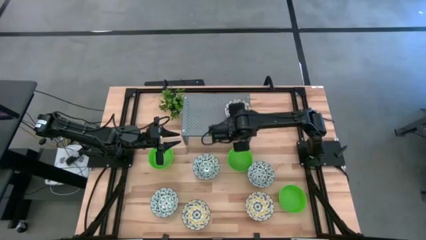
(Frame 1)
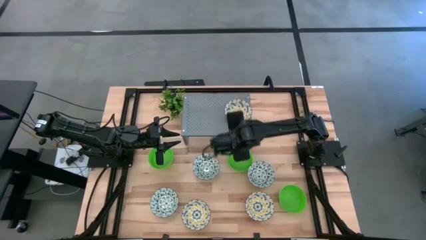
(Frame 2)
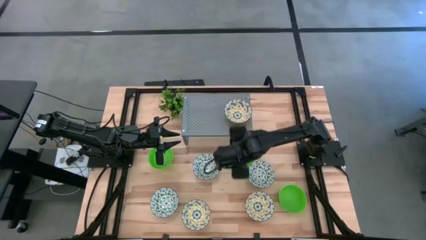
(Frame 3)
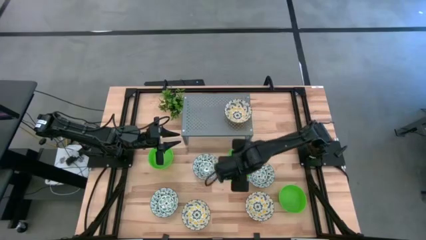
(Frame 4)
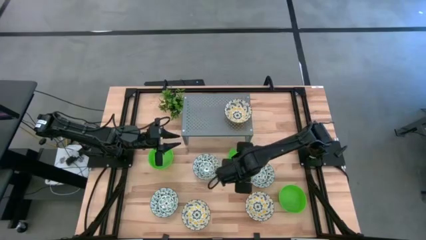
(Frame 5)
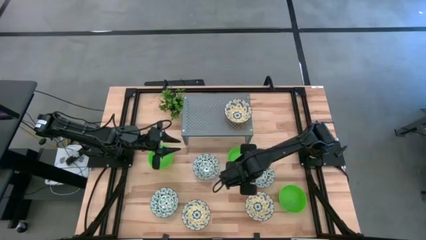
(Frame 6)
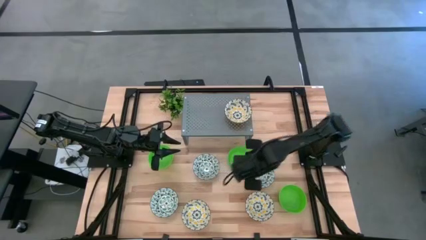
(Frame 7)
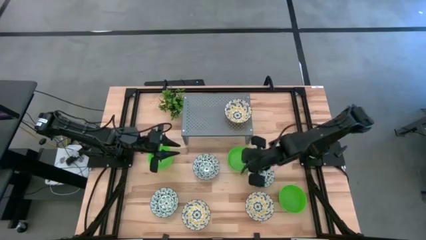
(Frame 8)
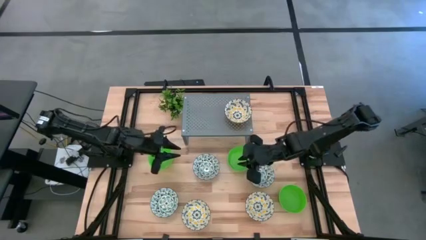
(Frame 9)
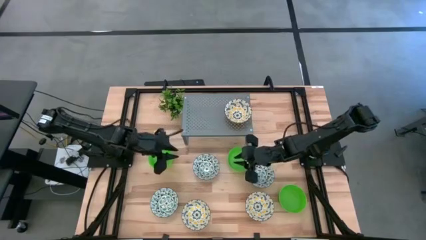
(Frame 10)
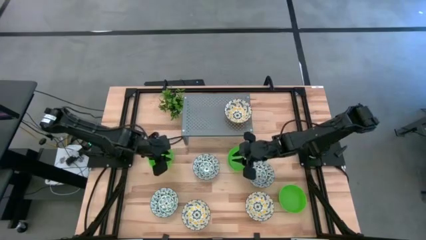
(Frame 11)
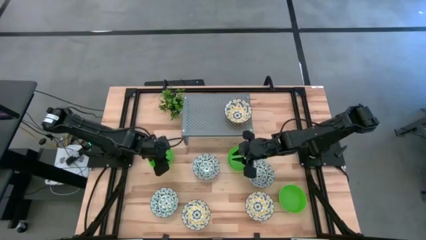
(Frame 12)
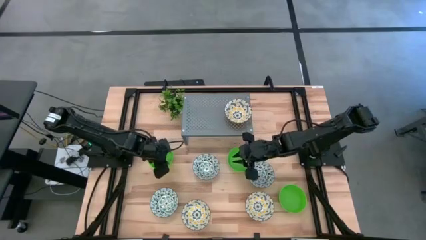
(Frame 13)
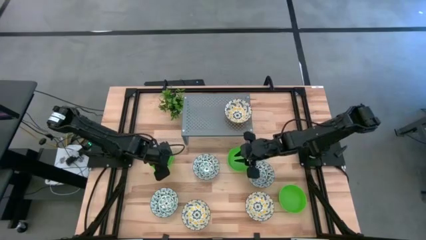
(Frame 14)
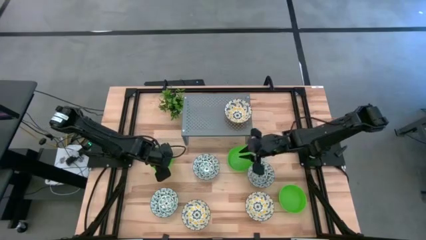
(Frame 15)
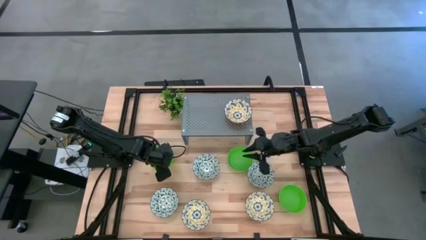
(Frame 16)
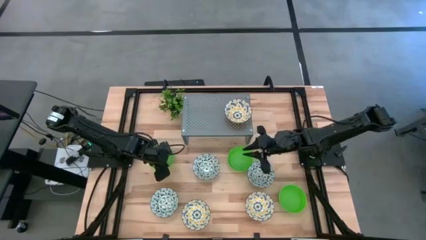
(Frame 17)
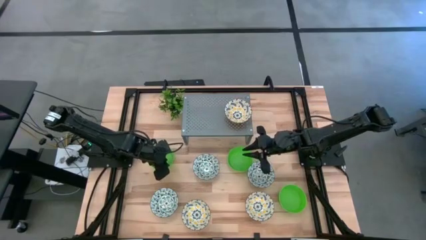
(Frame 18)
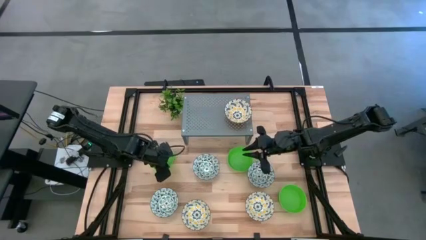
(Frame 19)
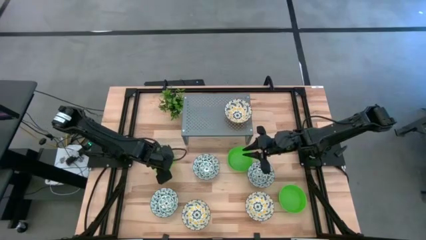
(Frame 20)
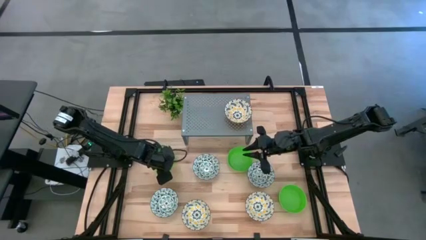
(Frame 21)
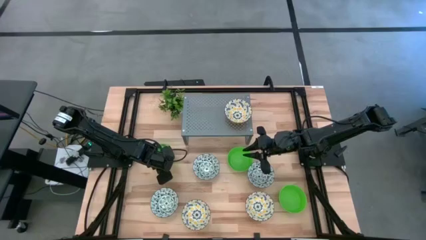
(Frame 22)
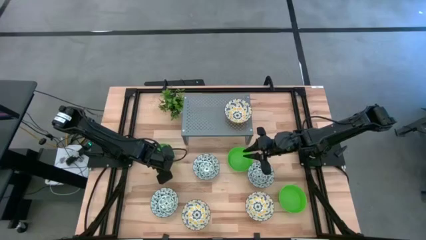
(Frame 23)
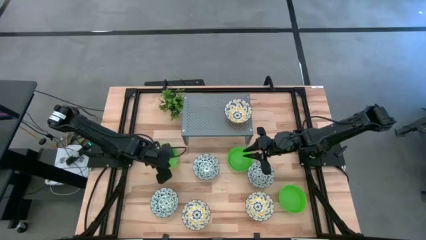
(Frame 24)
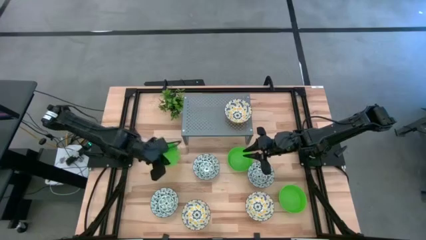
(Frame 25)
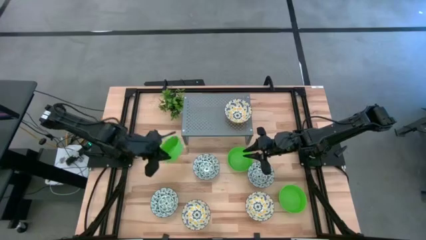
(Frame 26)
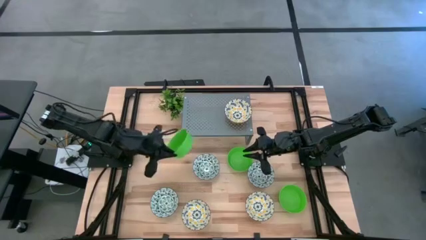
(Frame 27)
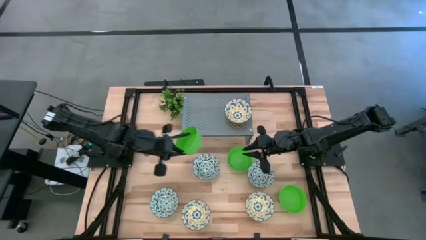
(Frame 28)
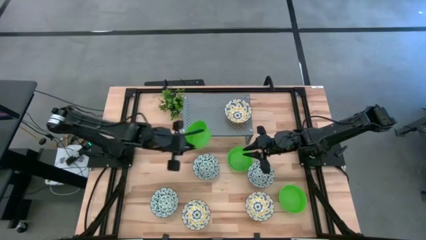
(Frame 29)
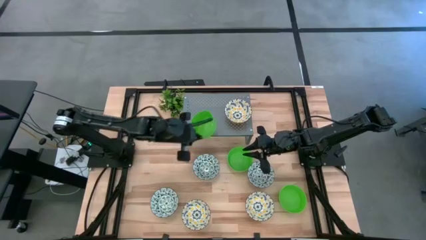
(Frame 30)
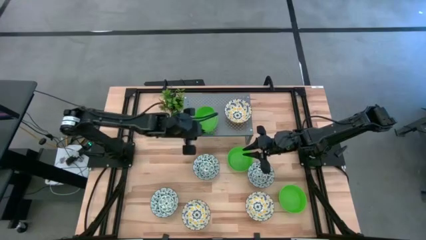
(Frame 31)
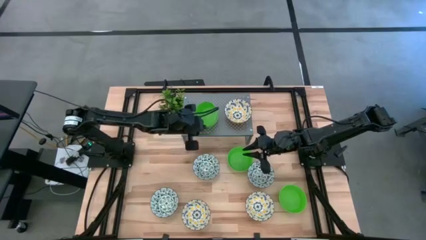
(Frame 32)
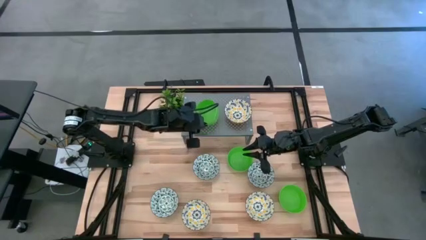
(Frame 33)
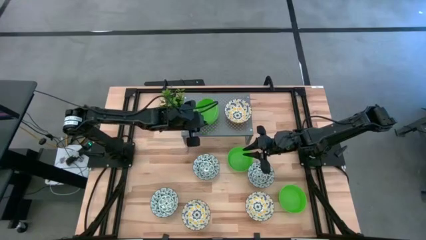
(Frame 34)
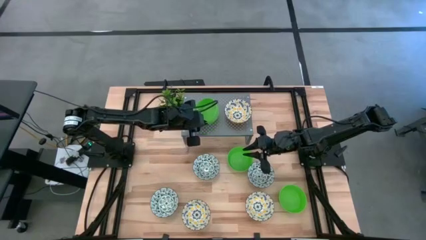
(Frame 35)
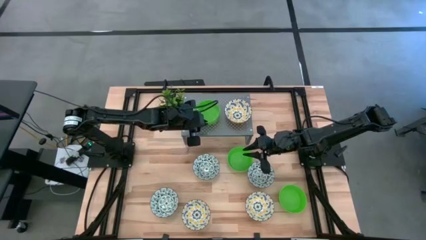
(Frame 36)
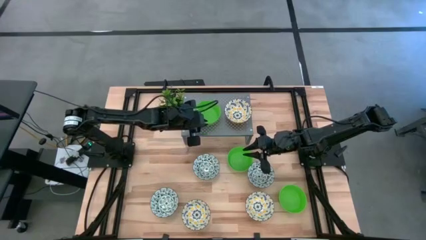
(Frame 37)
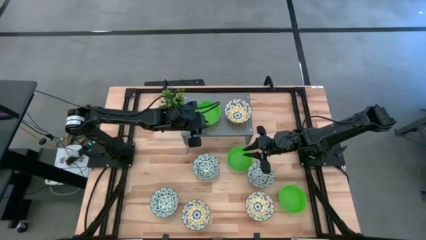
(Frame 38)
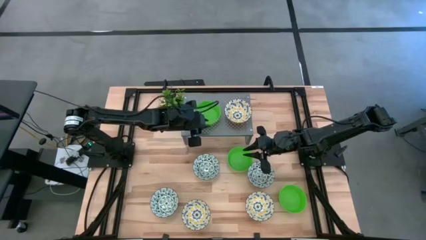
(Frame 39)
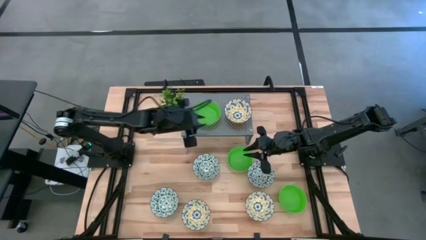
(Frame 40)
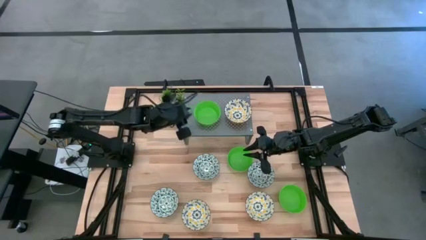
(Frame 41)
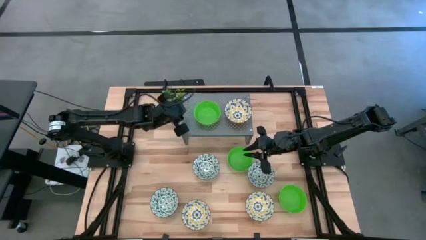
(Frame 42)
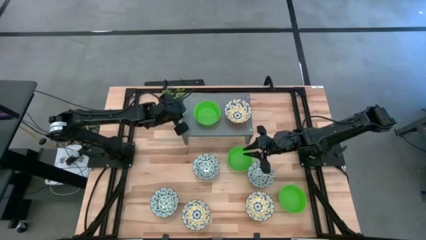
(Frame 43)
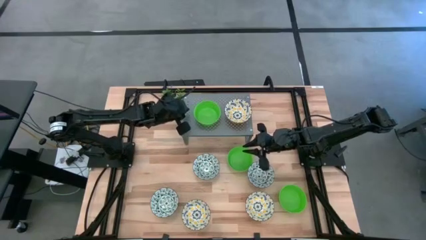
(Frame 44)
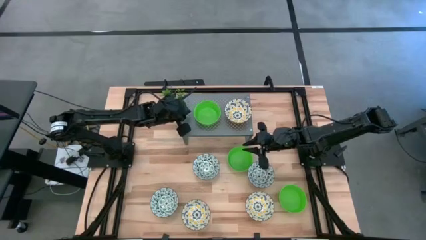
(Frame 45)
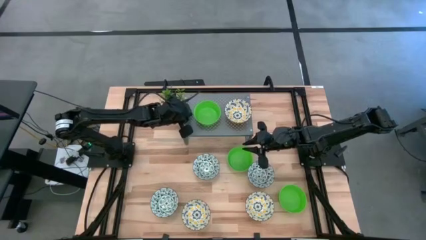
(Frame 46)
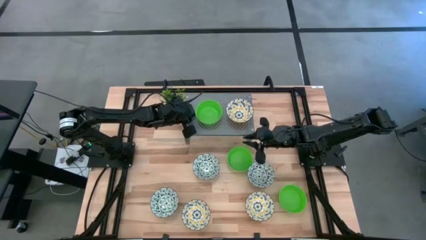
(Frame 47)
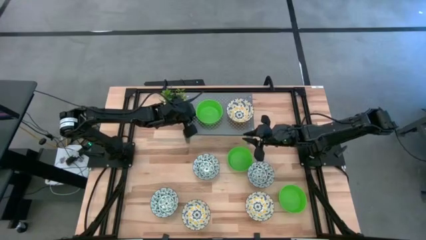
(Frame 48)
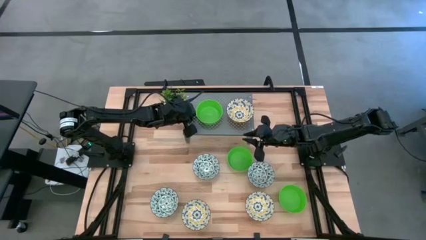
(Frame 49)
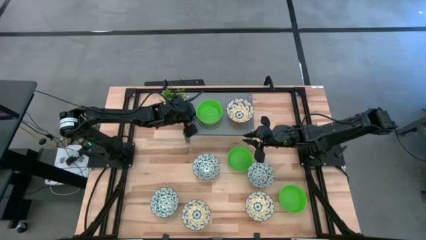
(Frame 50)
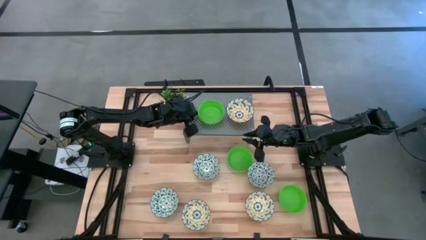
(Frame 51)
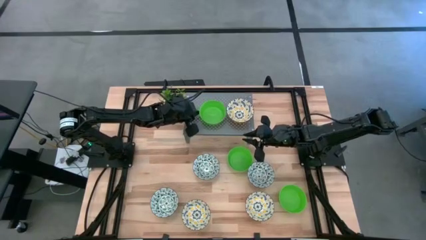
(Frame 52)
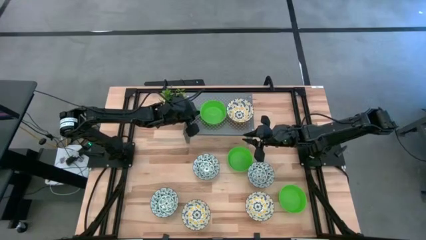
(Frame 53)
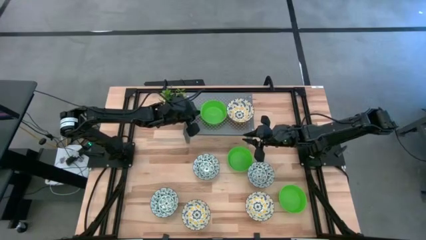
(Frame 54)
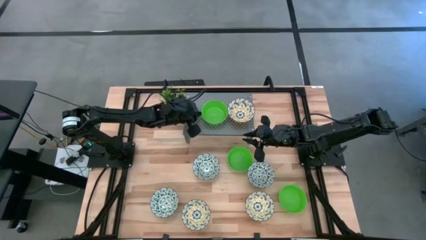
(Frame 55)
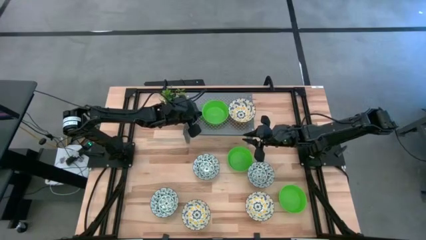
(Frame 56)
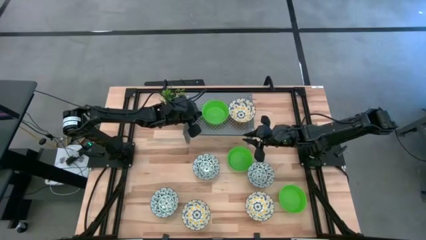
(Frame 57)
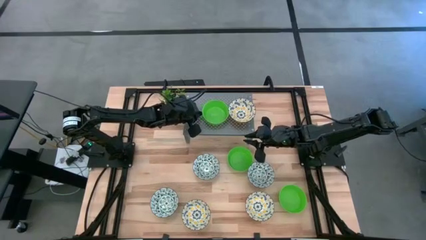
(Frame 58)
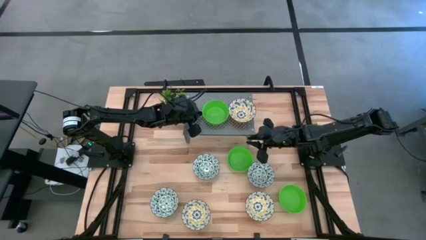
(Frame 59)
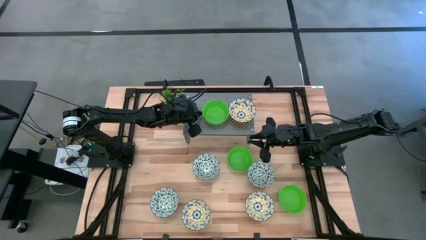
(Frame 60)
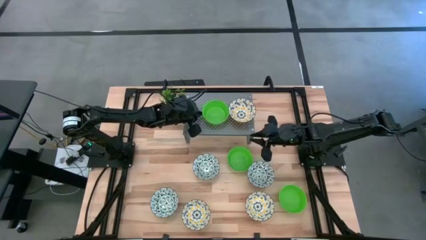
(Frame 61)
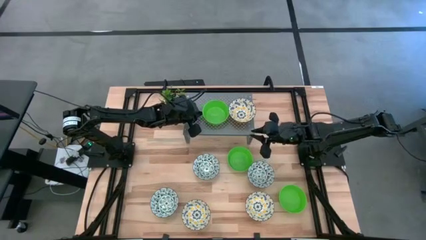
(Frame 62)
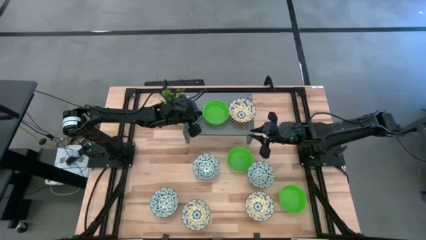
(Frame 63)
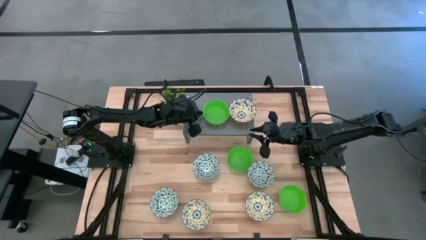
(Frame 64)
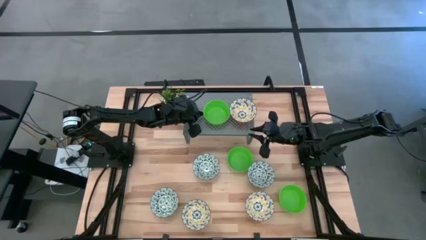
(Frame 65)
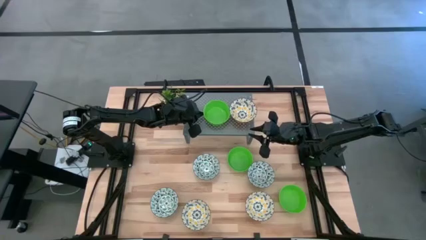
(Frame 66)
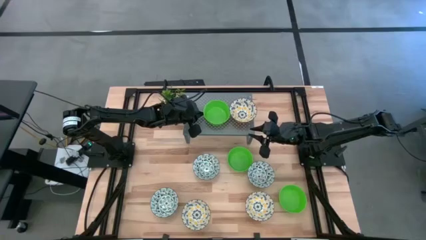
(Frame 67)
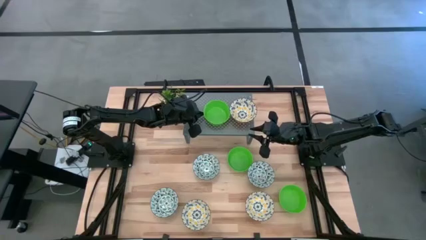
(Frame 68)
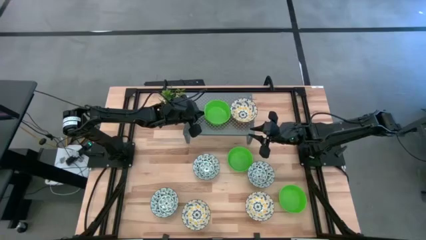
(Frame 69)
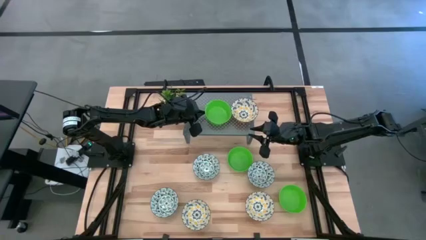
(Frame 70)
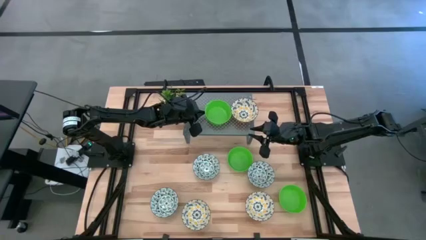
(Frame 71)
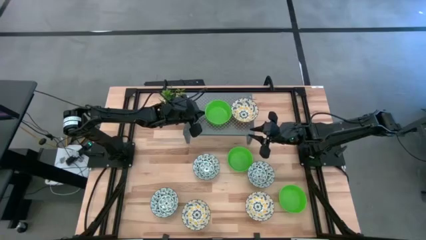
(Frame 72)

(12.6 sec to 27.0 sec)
Task: Pick & Place Mini bowls
Put the left green bowl on the shelf

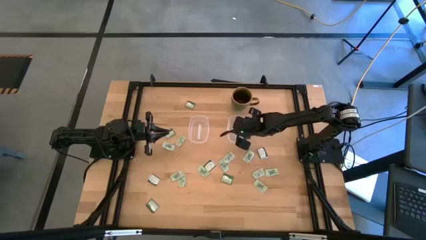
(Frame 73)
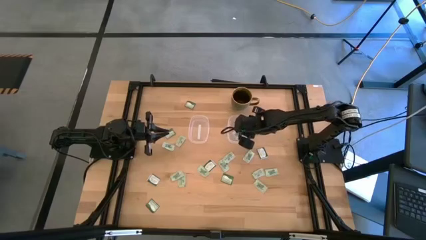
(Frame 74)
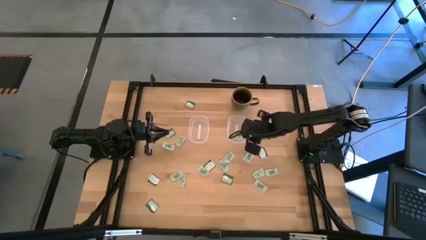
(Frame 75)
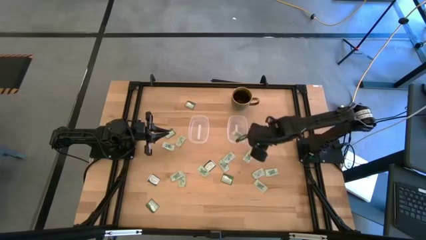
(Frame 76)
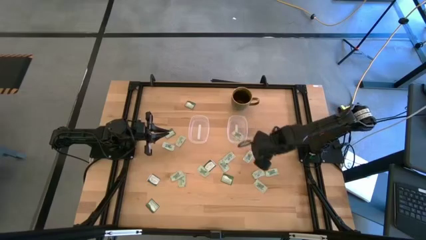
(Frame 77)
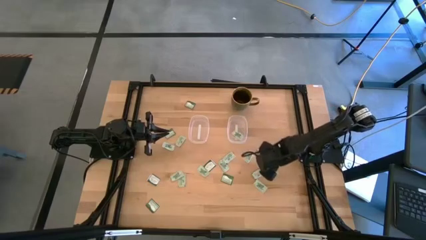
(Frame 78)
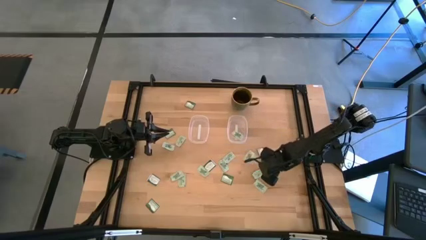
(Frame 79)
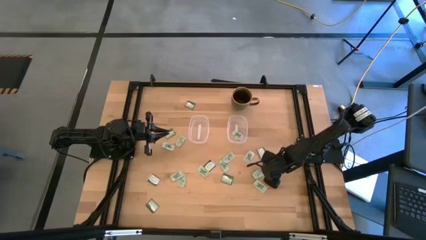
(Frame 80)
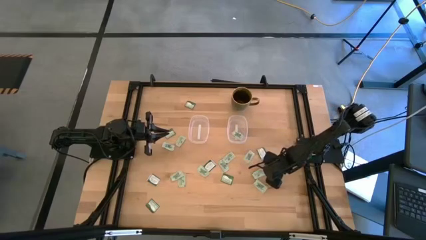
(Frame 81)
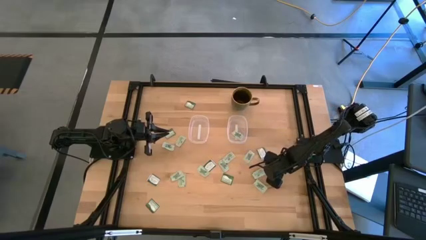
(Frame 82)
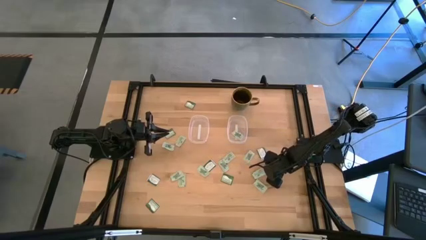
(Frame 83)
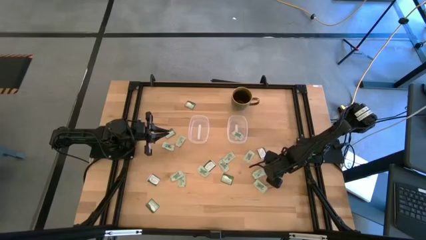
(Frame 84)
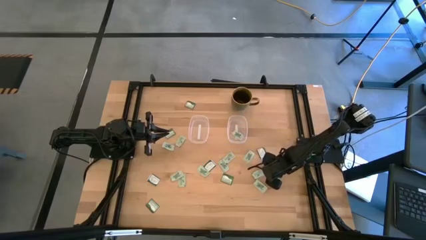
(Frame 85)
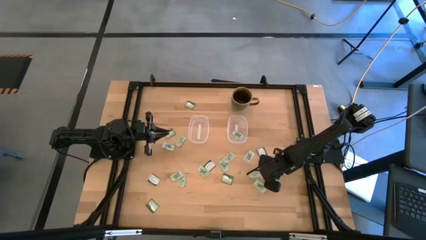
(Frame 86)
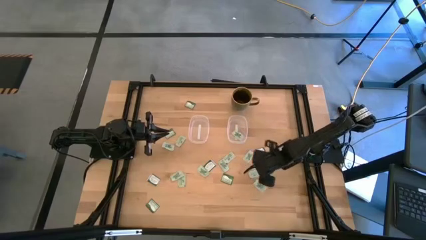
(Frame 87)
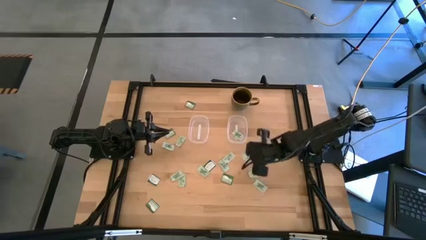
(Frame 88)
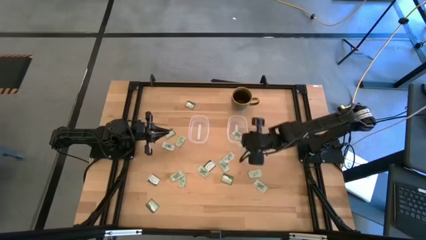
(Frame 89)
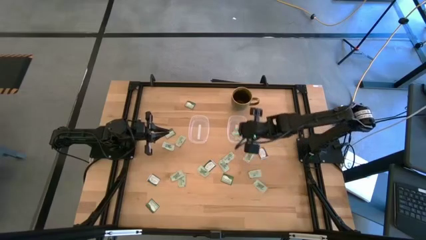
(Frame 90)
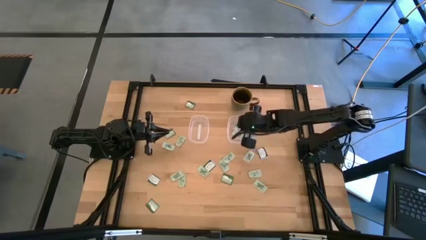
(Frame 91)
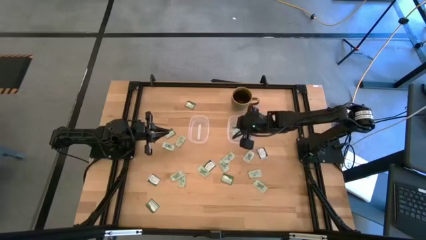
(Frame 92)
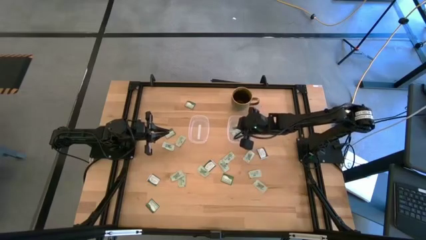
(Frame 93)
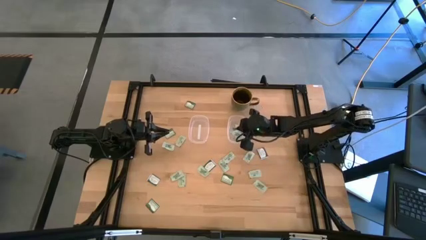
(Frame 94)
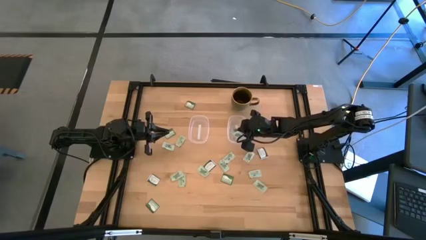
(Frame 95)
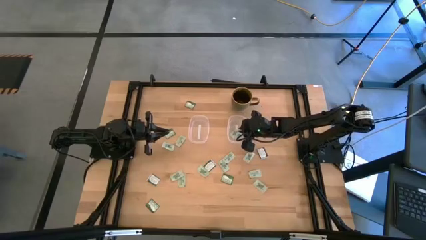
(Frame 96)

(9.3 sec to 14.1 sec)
Task: Pick and place items into bin
Put the stevia packet into the right transparent bin
